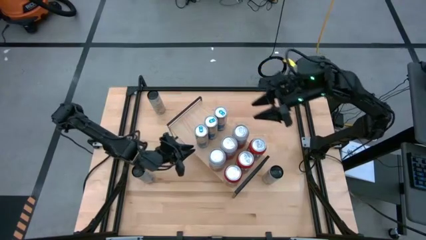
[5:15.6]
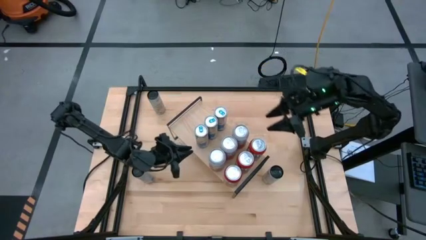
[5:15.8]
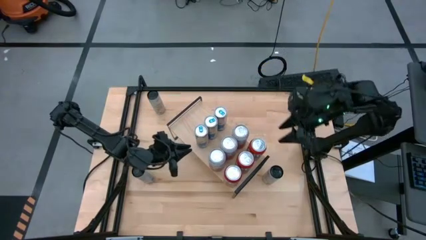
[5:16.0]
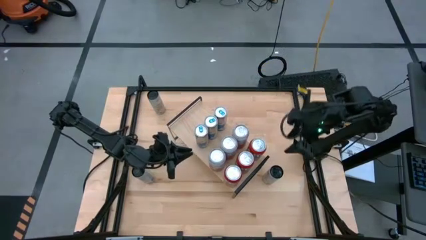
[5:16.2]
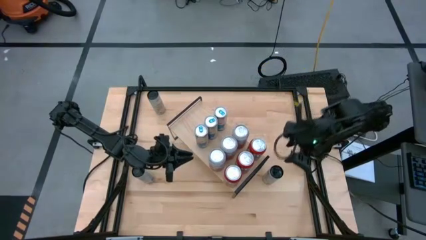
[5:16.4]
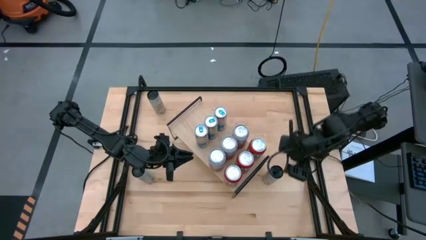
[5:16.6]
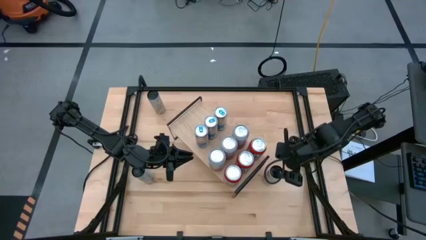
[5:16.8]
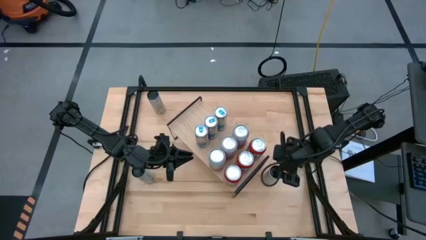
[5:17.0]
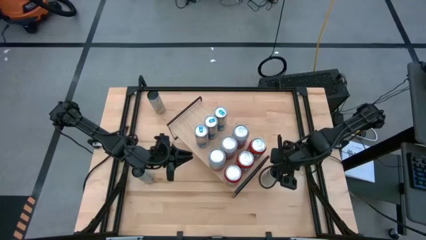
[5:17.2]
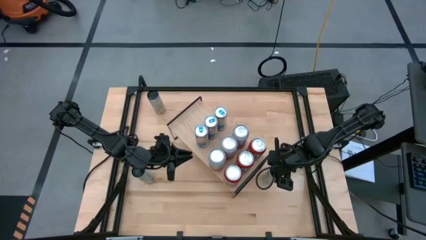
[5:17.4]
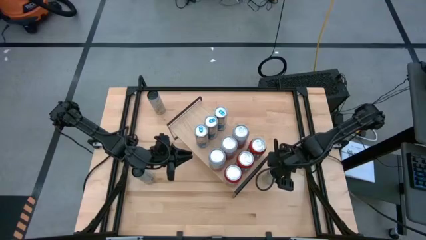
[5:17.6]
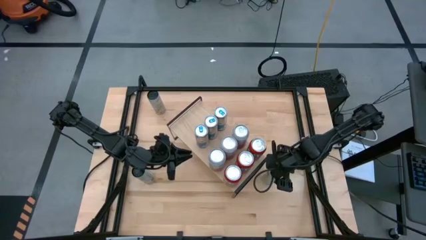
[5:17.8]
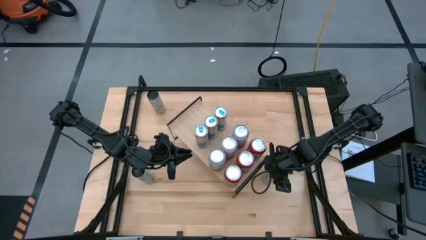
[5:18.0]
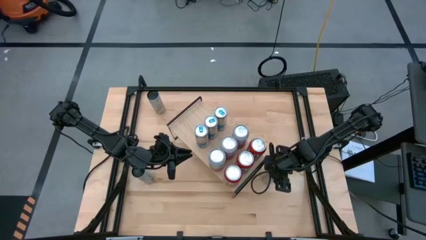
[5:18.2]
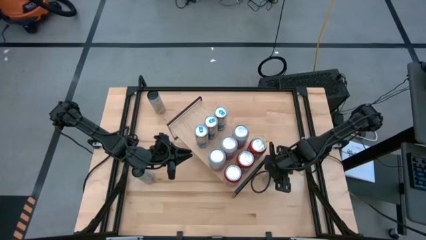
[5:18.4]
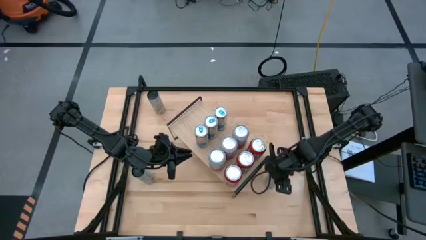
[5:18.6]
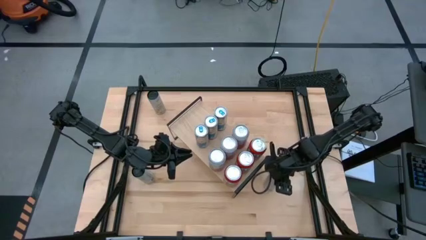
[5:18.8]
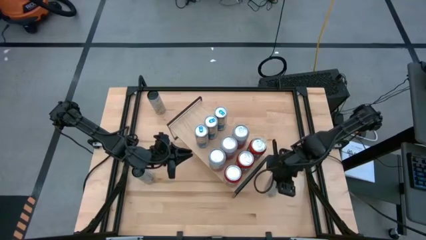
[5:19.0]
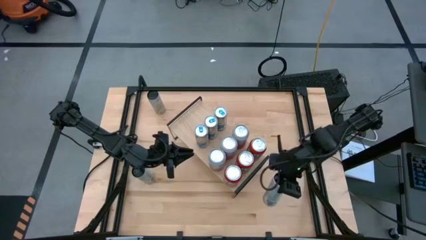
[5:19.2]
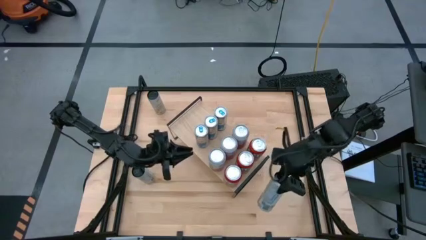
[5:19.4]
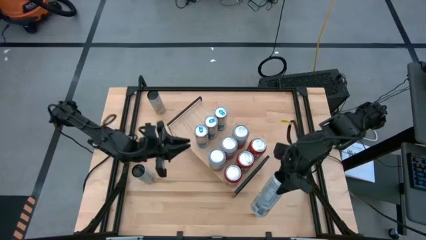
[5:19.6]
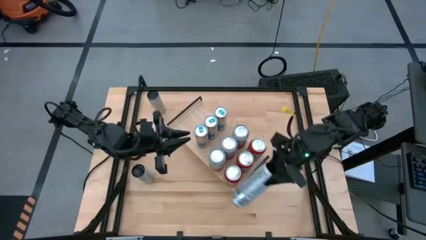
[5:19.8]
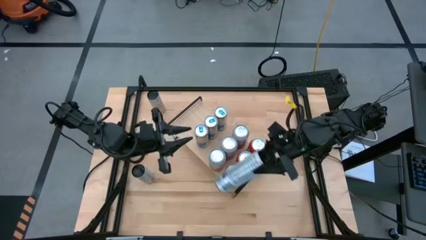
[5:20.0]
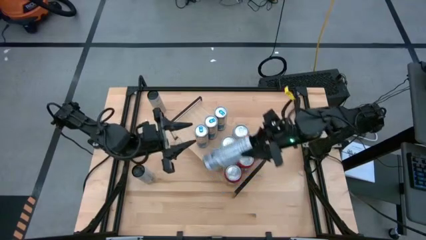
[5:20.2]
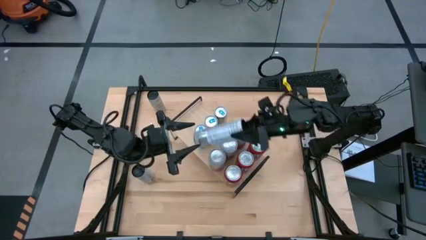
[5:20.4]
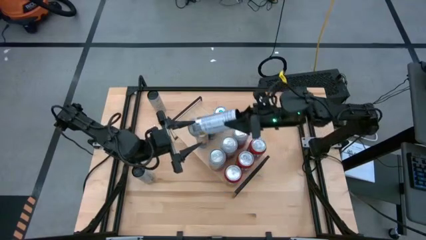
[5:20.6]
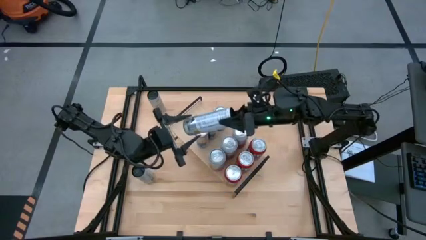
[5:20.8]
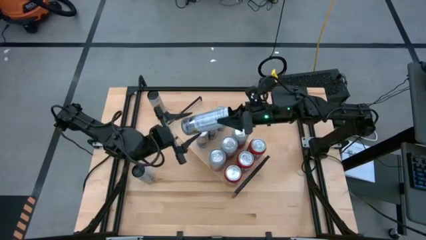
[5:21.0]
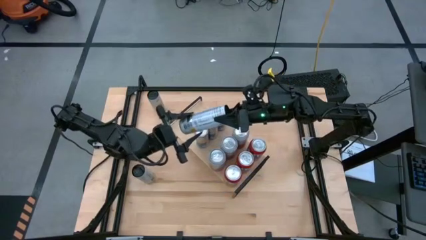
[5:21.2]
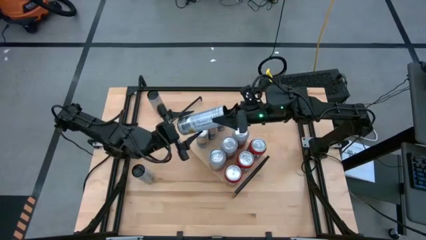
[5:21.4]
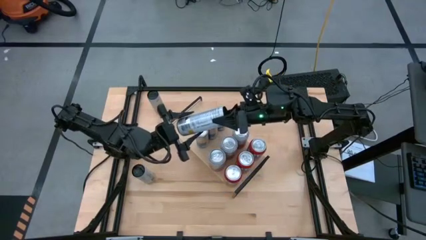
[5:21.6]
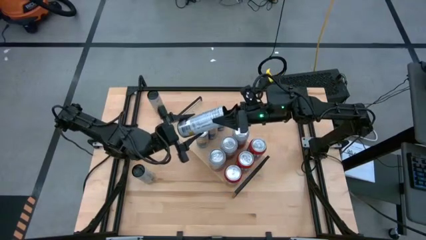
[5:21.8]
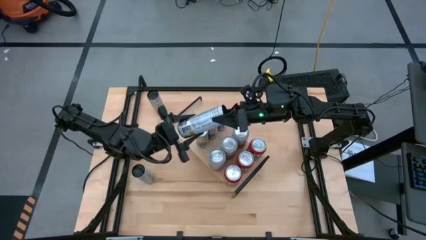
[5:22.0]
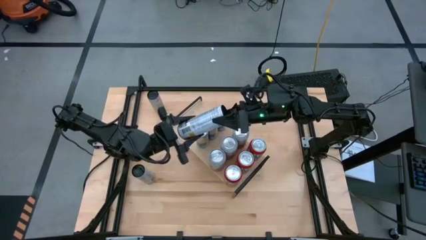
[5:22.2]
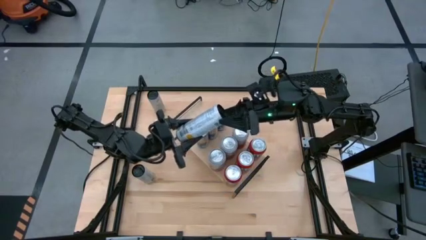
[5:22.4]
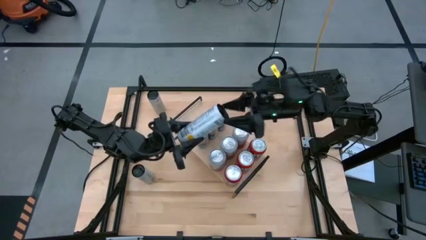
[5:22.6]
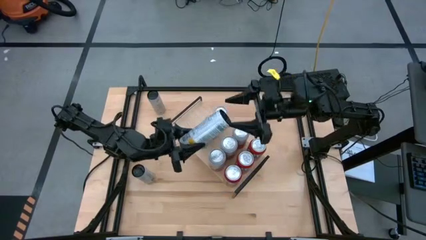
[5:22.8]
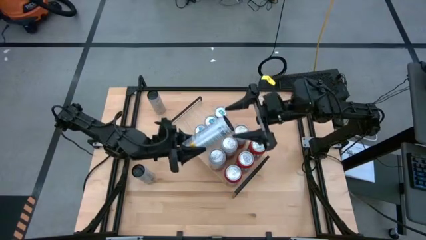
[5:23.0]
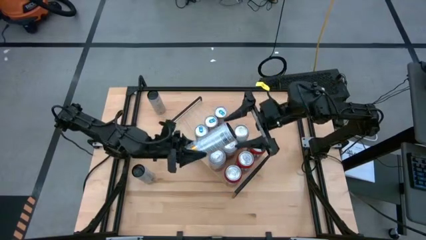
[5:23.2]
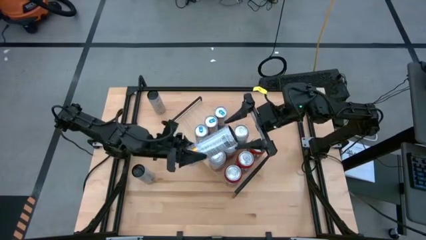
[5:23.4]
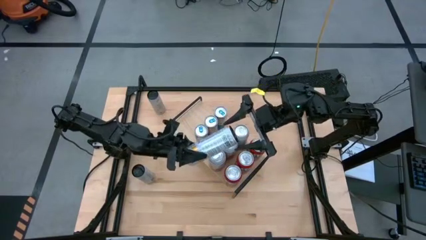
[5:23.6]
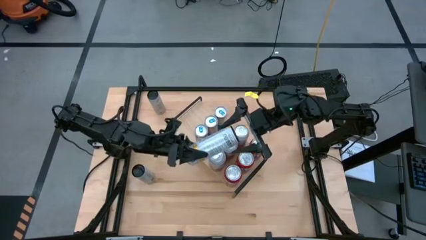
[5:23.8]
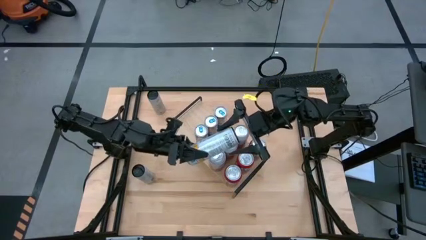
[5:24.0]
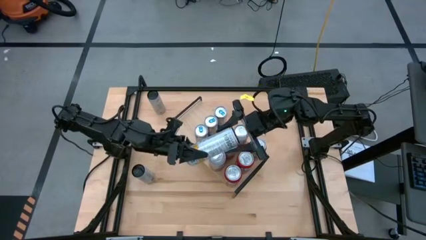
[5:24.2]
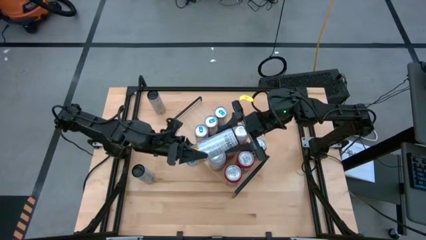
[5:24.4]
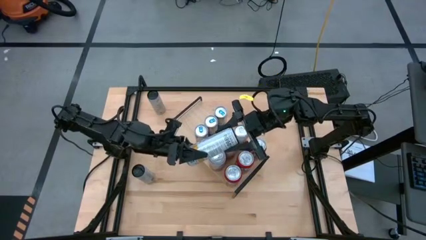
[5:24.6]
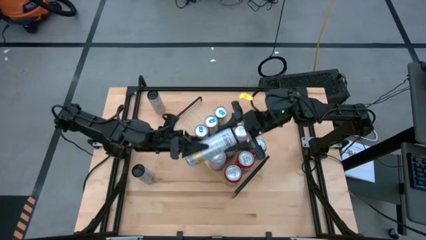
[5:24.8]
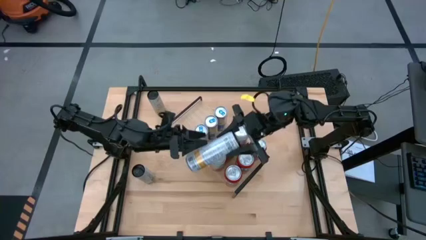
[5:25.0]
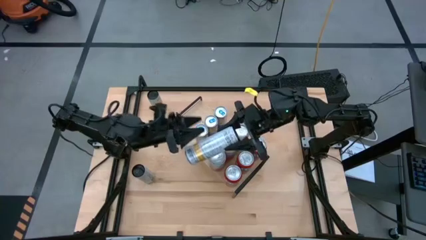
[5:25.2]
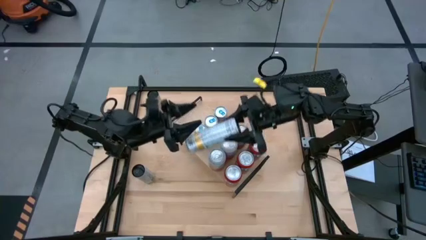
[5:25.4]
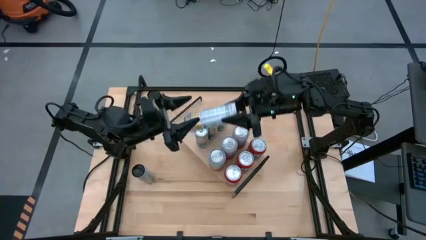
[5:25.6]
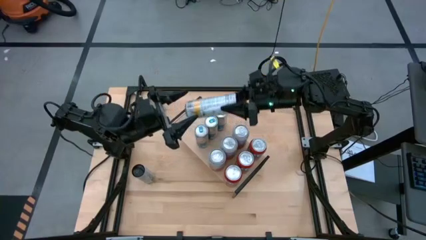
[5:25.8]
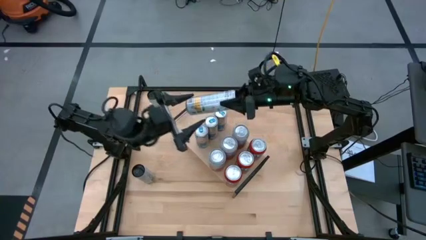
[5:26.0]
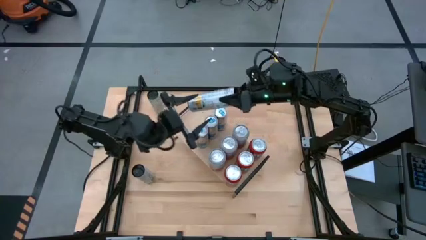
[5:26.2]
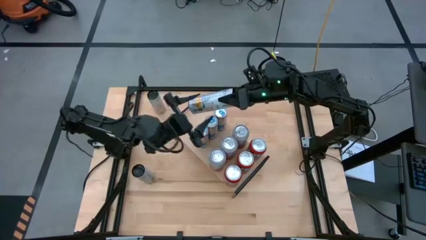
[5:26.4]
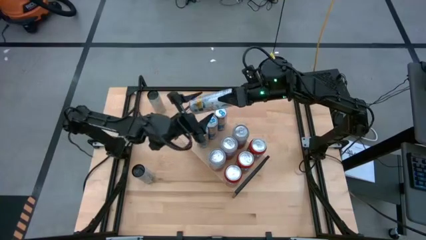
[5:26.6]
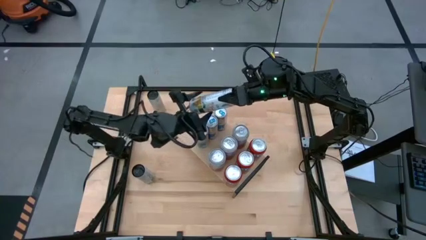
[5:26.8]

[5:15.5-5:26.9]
Task: Place canned beverage on shelf
Put the bottom right white yellow soda can on the shelf

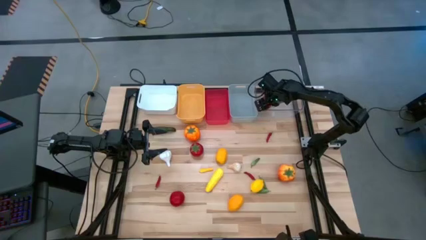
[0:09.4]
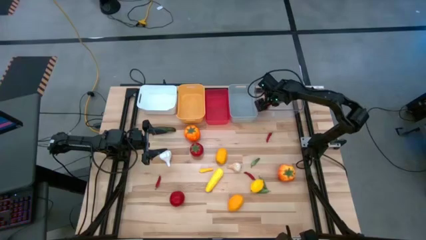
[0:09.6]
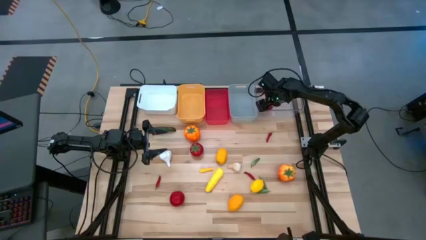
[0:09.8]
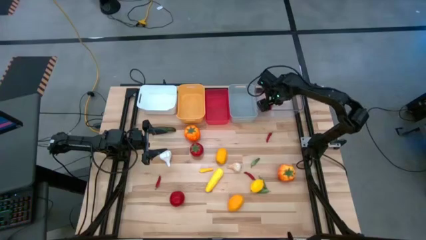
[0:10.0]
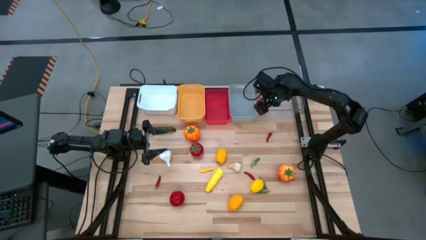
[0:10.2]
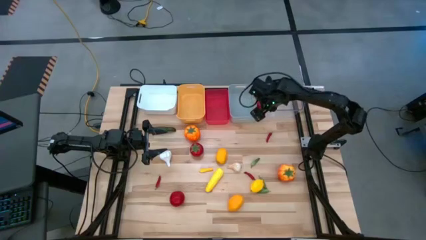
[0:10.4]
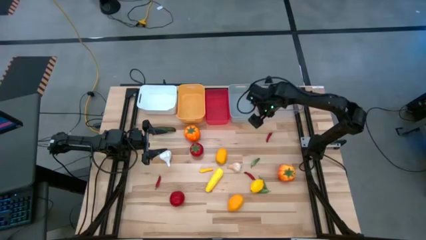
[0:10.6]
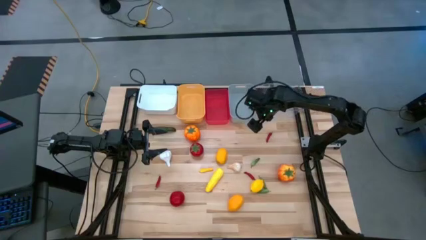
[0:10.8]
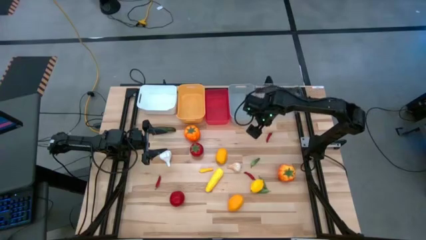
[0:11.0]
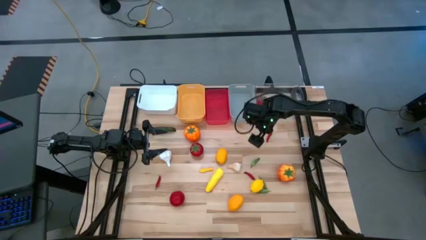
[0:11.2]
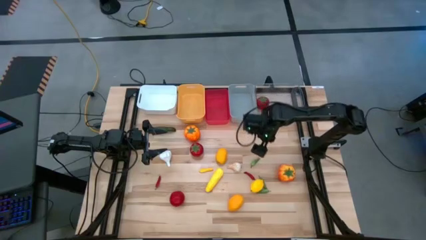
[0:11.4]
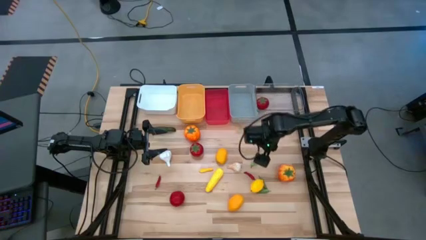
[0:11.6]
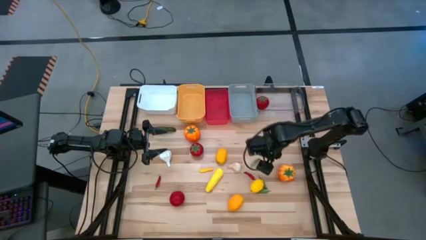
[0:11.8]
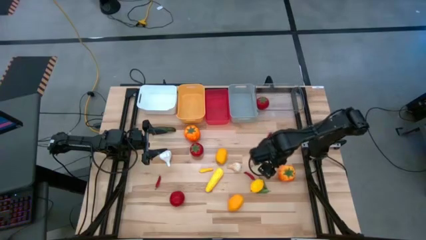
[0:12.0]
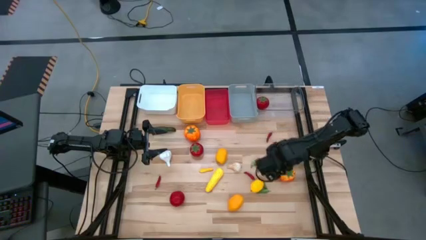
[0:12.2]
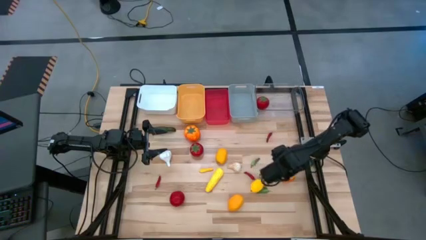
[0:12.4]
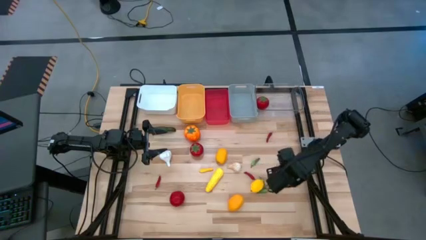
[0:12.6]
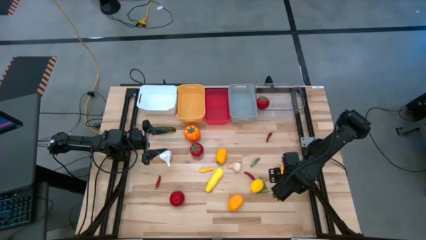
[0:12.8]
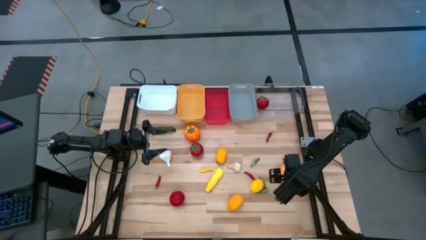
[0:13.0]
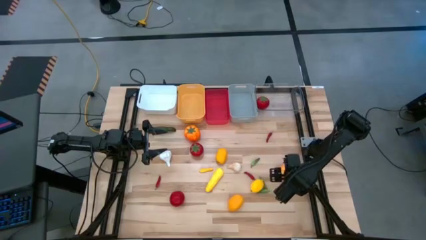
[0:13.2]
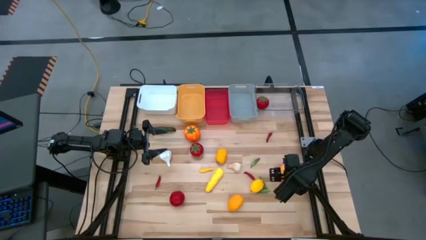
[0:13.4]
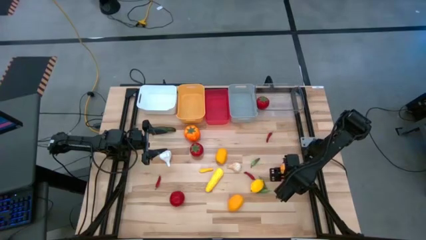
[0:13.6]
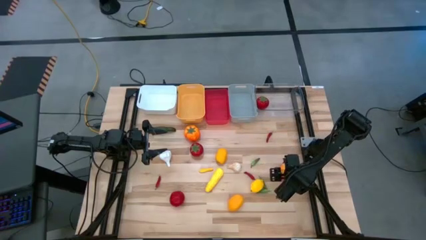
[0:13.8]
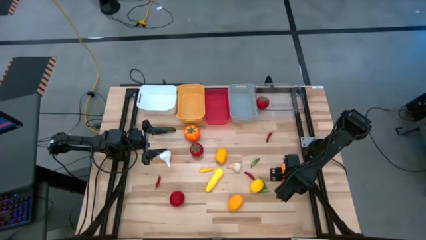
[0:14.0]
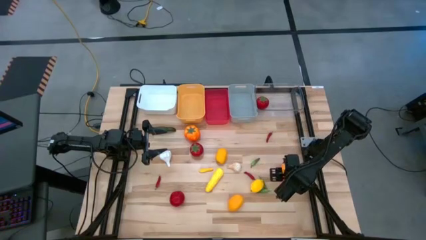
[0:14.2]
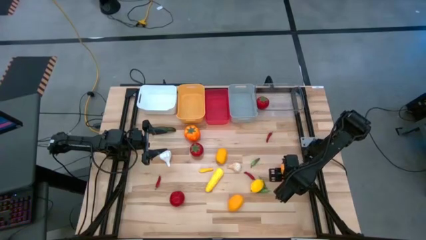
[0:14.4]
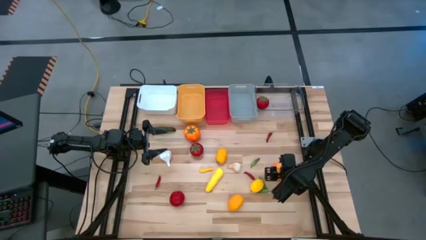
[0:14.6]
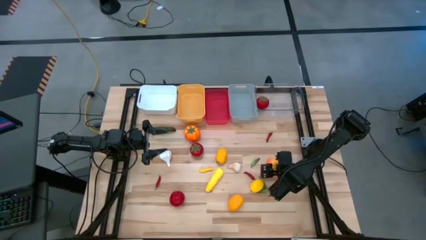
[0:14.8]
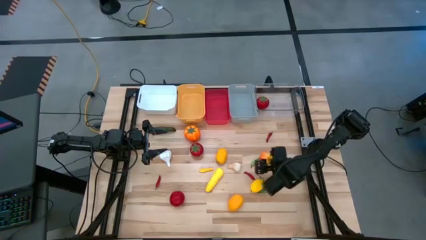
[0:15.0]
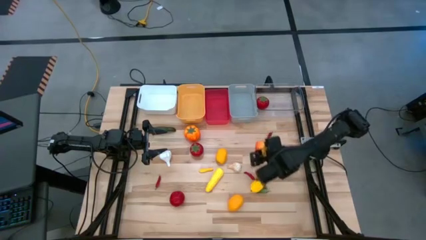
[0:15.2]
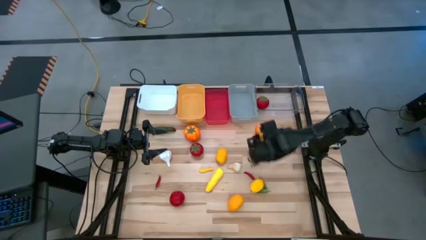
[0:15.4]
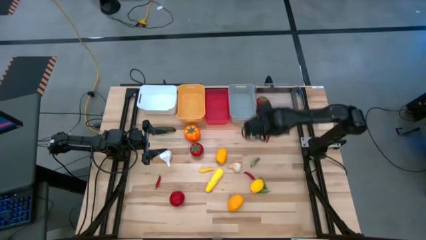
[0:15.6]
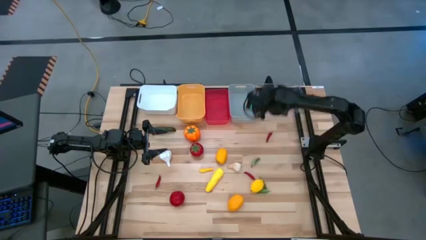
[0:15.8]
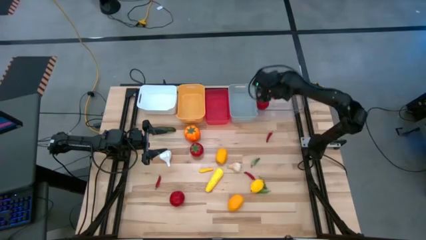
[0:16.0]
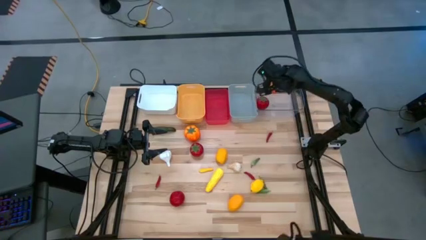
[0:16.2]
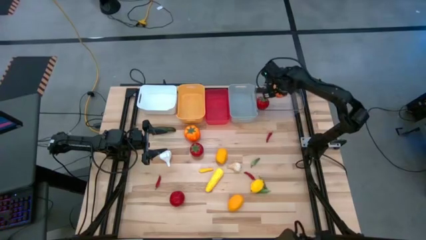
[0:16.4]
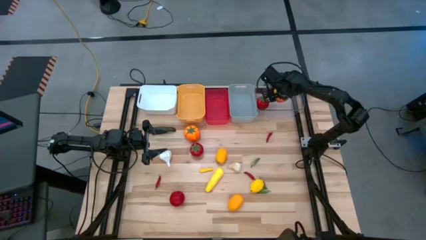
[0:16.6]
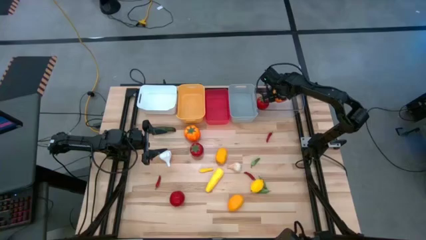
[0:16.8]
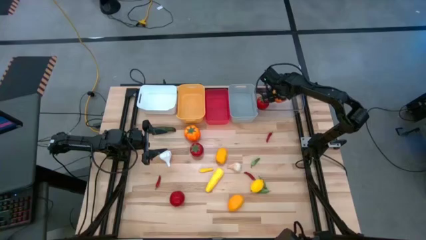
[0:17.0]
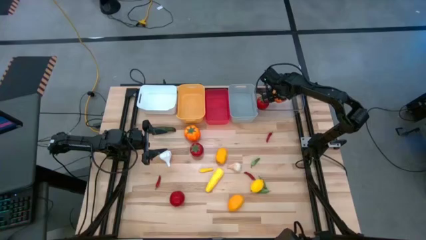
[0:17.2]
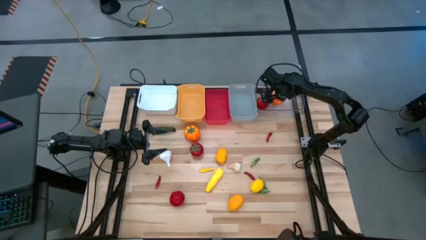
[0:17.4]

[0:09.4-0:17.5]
Task: Sort produce into baskets
Put the orange tomato into the transparent bin
